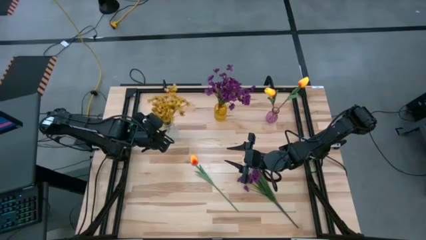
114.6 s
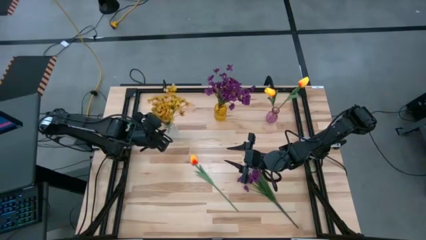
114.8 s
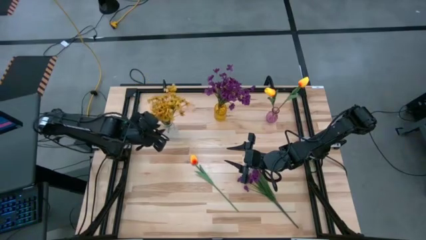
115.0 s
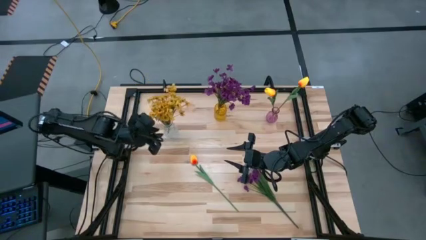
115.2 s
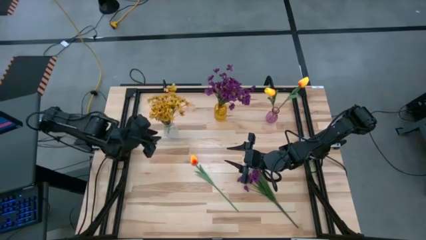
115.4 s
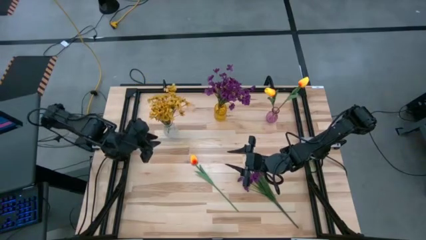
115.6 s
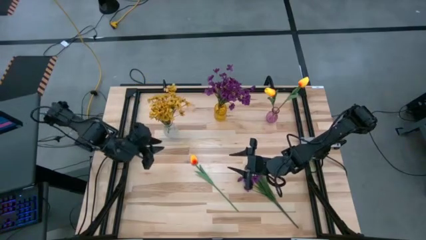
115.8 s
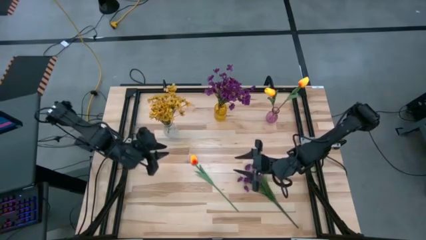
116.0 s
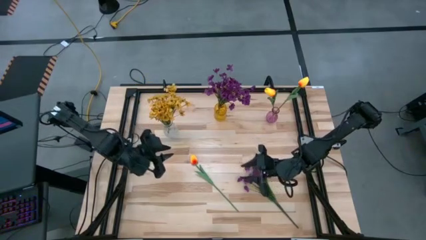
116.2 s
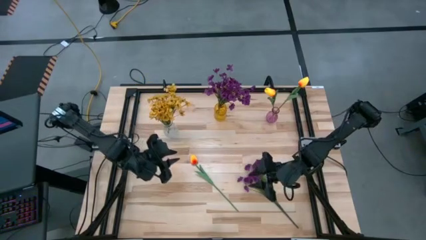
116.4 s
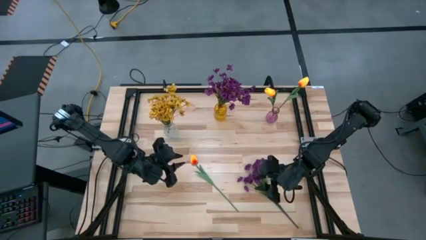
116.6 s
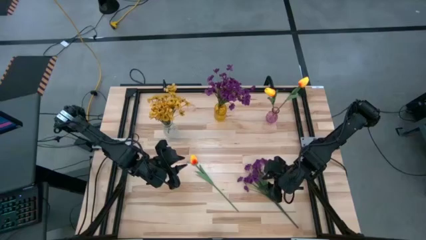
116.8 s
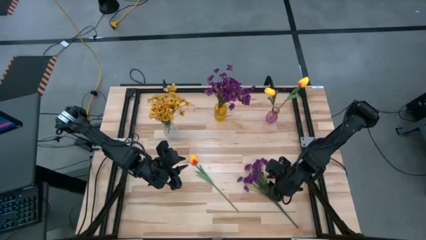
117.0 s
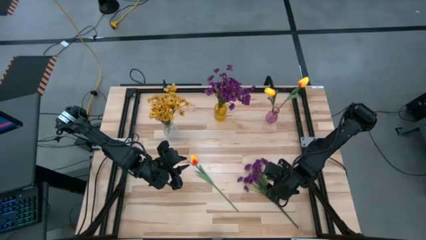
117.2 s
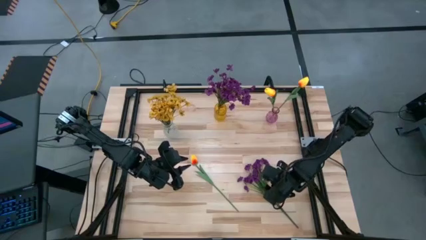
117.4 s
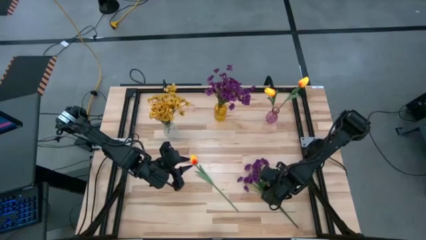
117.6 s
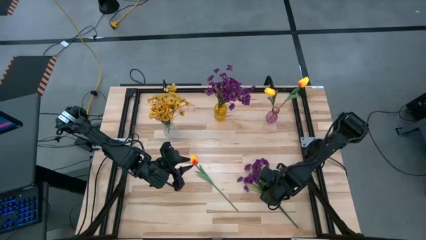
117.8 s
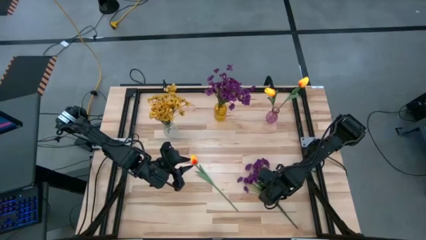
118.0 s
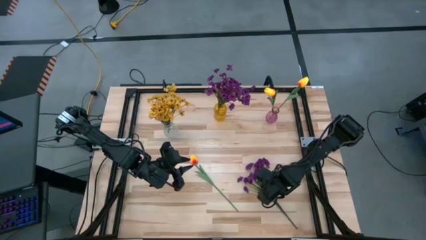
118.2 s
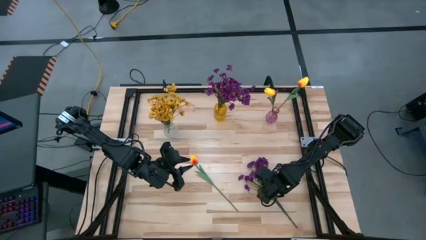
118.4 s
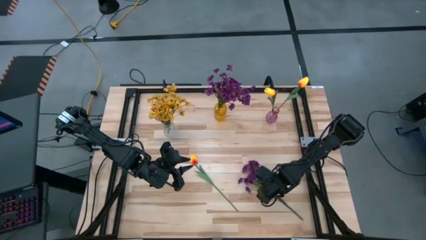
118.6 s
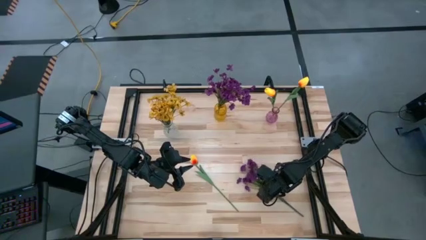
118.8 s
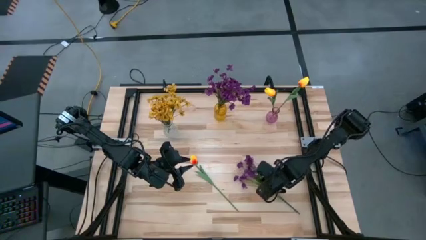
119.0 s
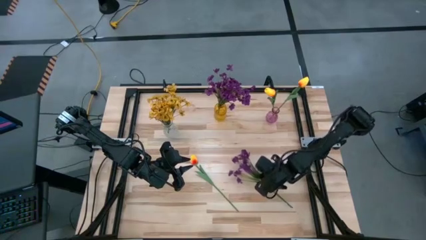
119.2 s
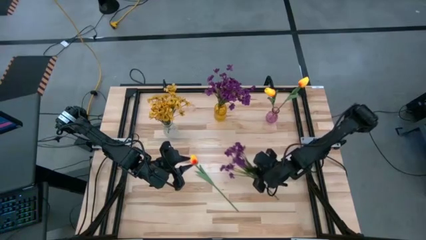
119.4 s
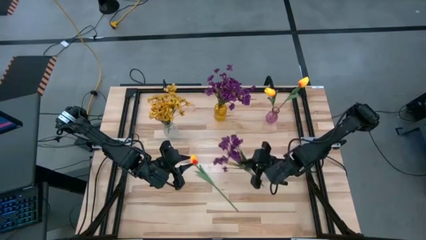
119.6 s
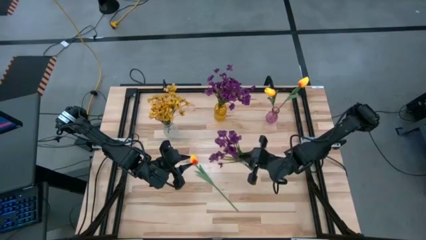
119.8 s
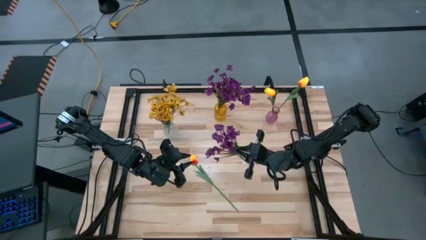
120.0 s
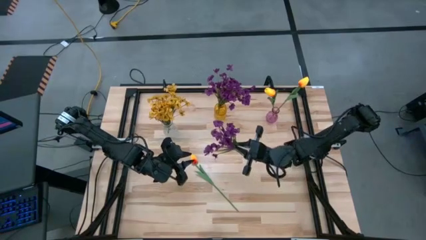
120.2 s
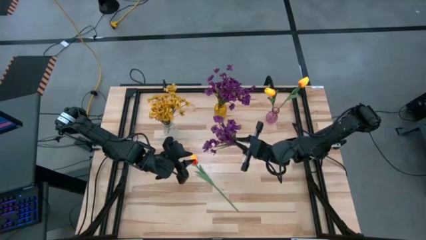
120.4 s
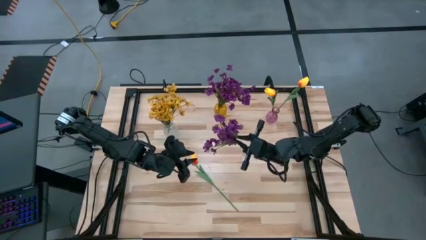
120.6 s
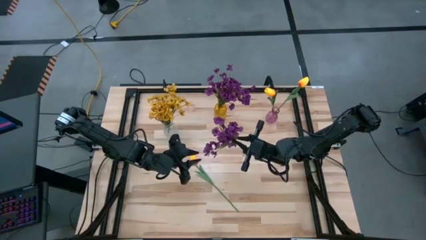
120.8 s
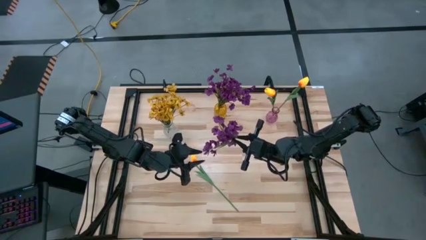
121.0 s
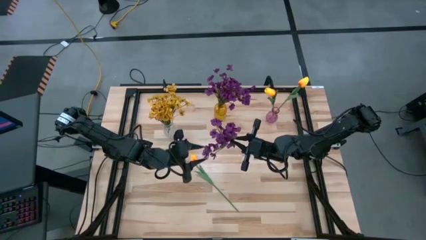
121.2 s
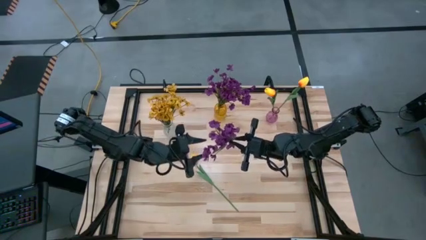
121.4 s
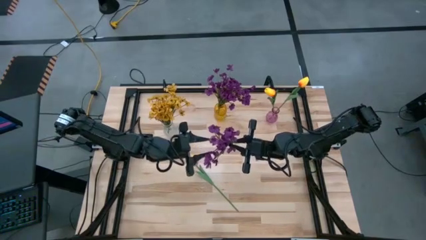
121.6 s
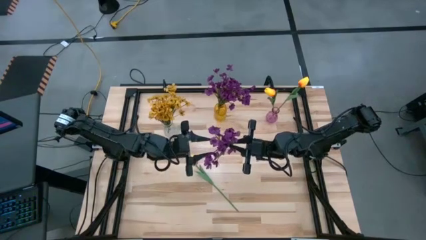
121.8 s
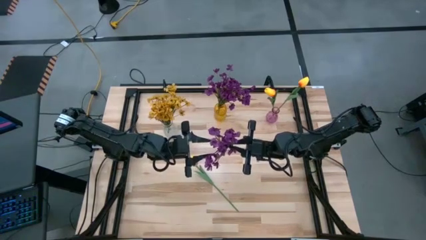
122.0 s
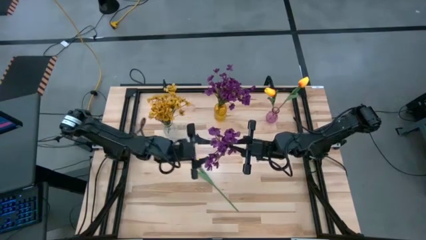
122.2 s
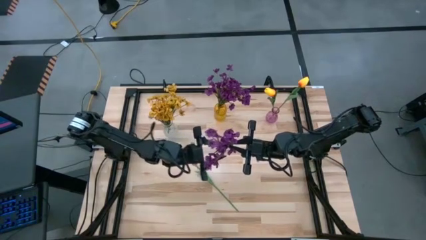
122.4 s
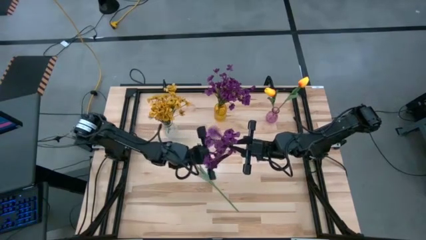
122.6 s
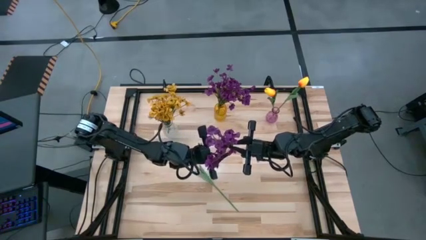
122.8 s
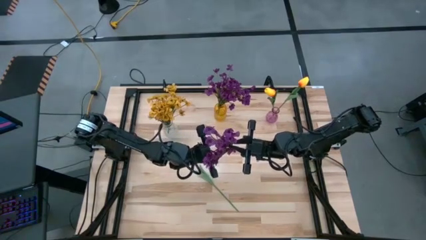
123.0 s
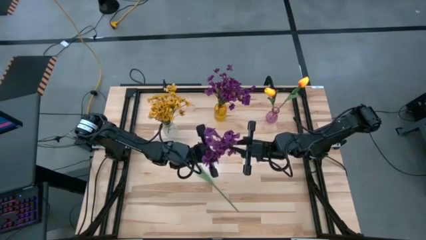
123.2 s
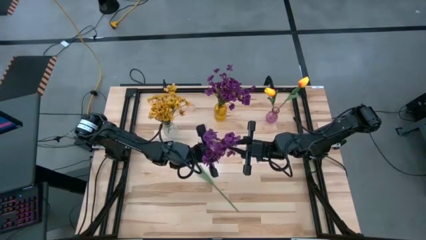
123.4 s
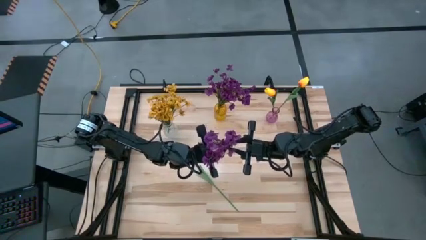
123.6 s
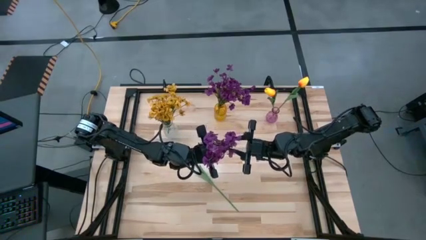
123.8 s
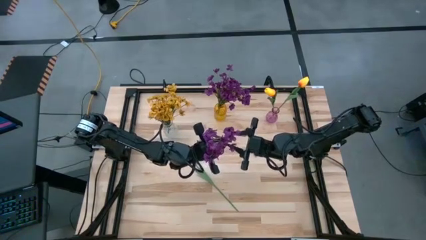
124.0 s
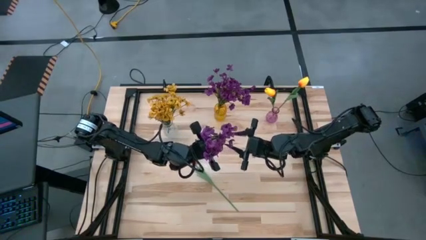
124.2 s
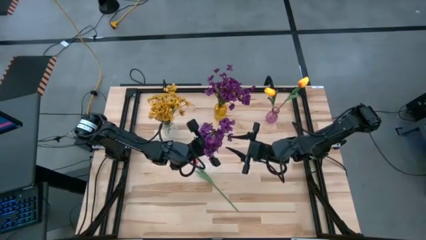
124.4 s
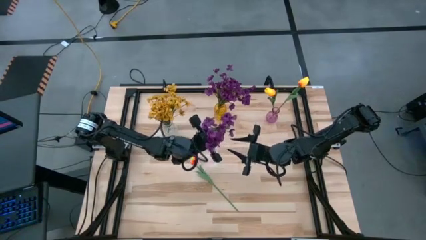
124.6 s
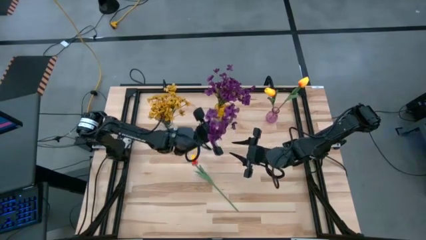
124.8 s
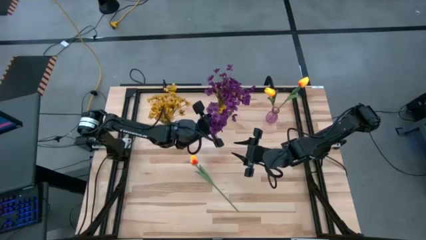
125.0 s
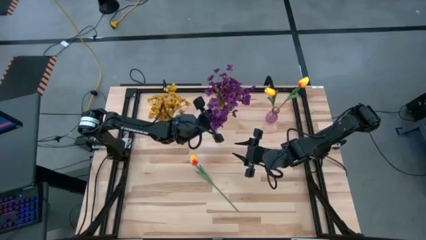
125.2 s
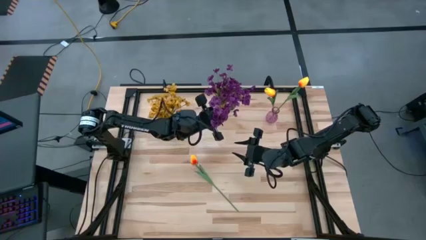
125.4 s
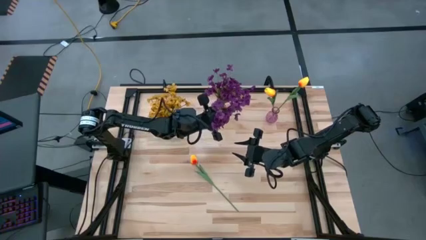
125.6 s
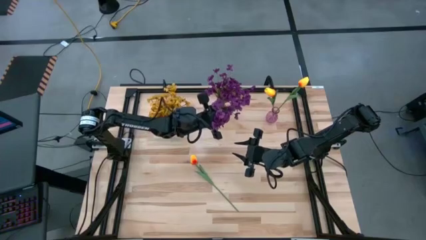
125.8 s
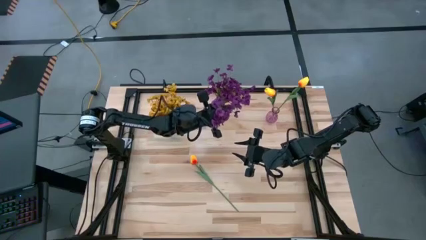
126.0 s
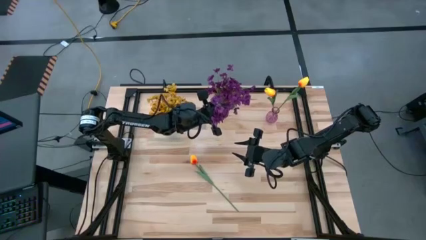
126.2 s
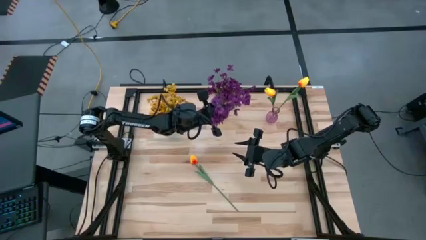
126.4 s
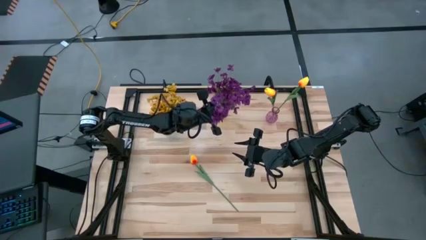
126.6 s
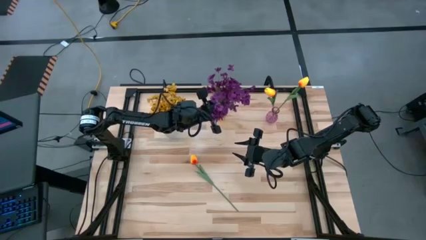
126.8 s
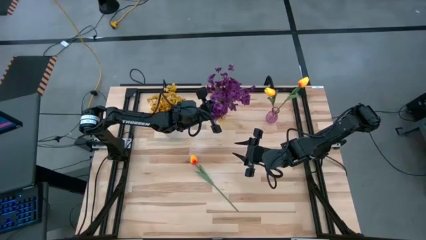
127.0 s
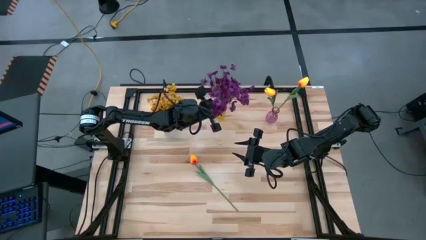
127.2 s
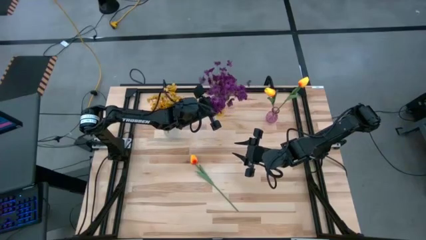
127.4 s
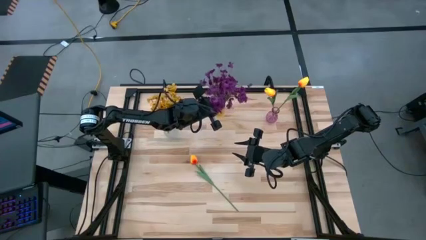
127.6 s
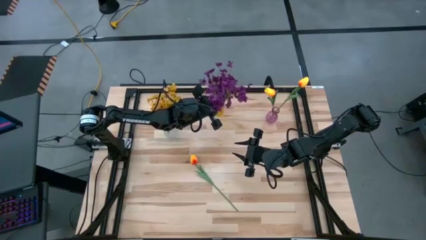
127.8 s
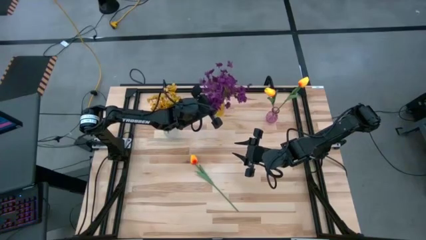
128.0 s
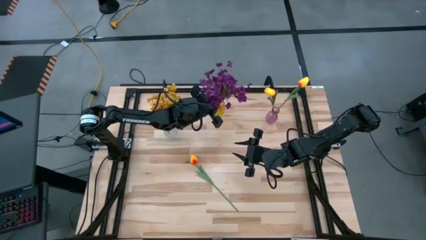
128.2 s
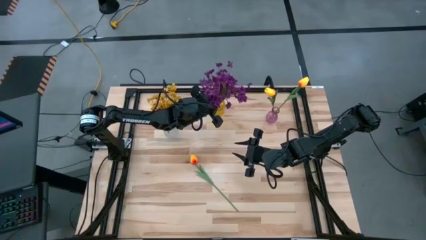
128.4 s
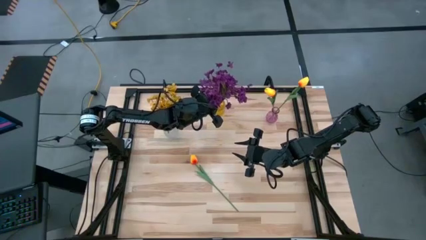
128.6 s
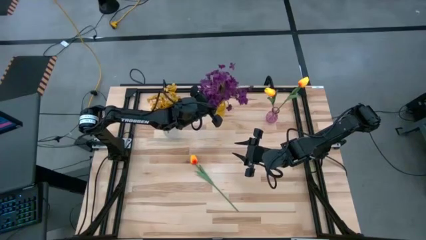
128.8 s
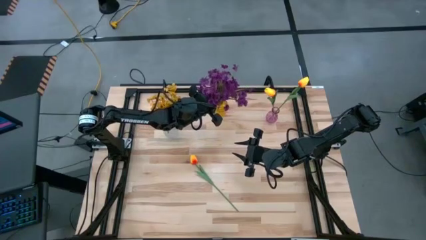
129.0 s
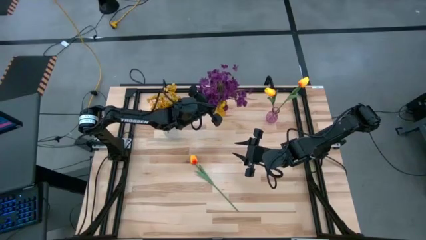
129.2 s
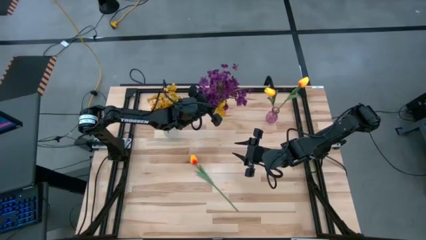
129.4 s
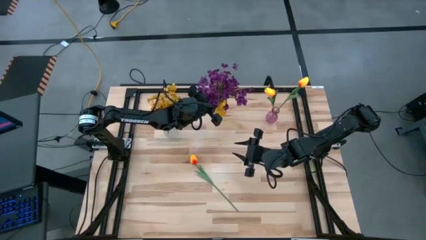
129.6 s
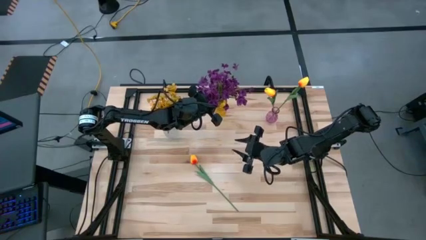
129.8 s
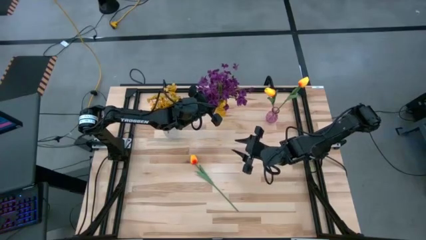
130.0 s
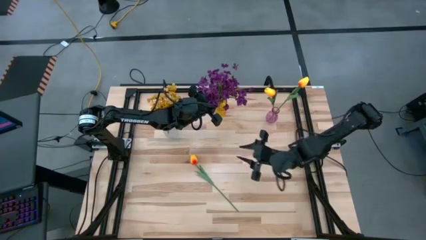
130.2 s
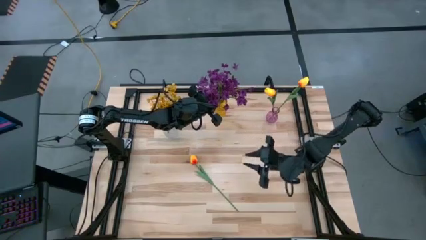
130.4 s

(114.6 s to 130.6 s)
Task: Sort flowers into vase by color
Put the purple flowers into the yellow vase
